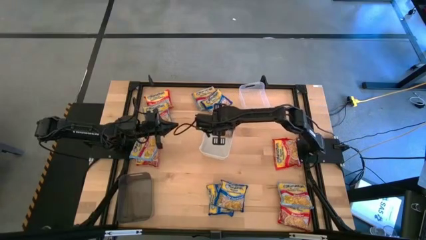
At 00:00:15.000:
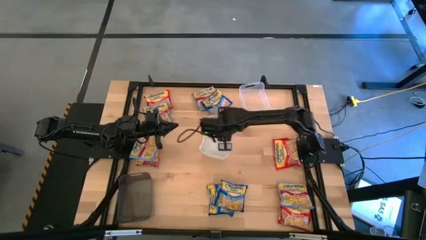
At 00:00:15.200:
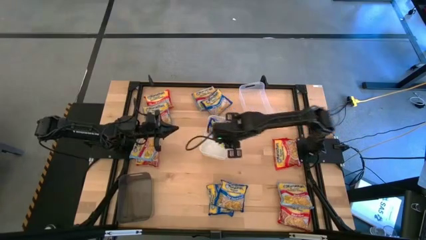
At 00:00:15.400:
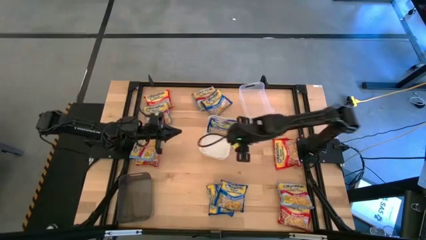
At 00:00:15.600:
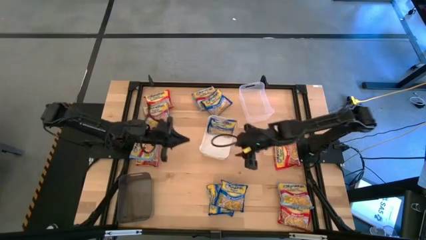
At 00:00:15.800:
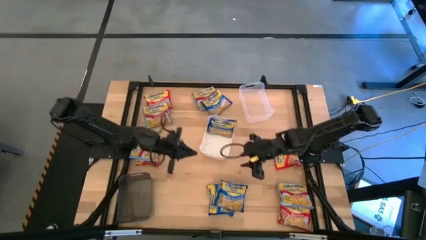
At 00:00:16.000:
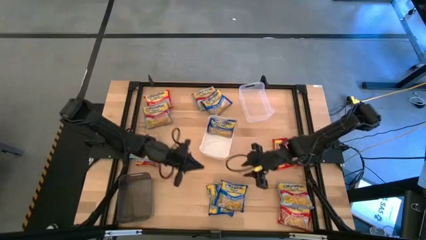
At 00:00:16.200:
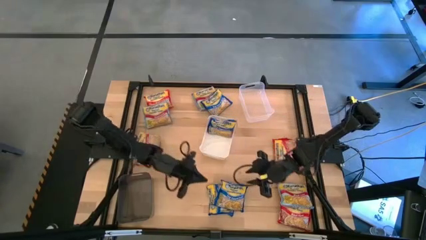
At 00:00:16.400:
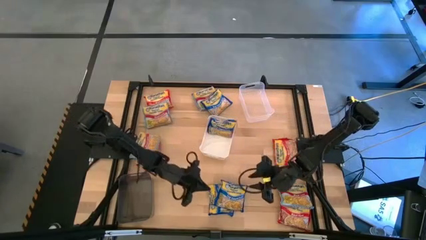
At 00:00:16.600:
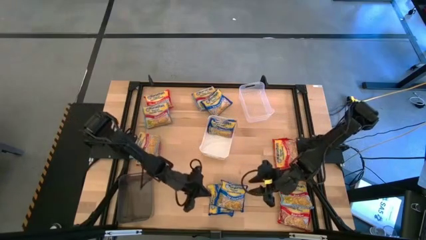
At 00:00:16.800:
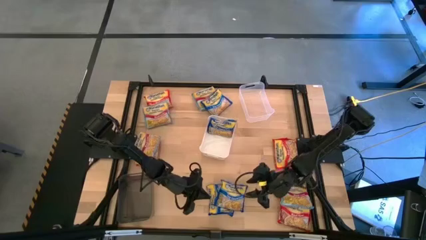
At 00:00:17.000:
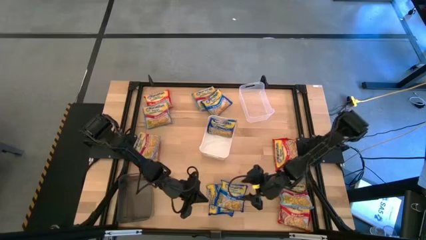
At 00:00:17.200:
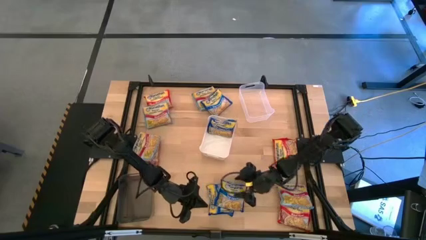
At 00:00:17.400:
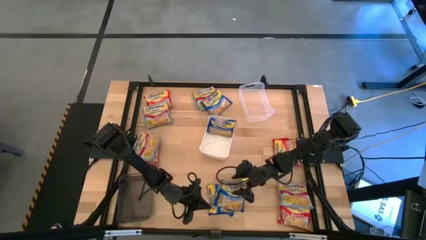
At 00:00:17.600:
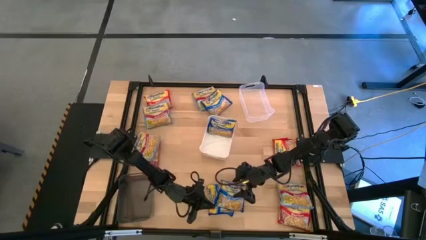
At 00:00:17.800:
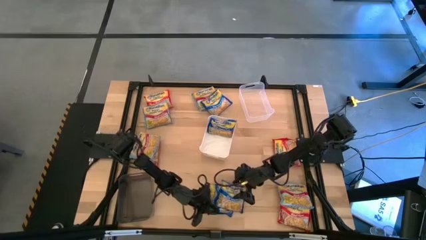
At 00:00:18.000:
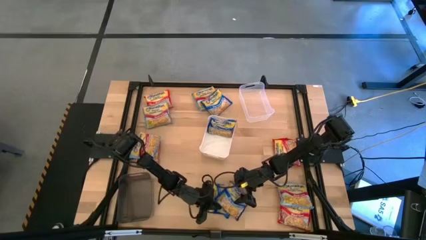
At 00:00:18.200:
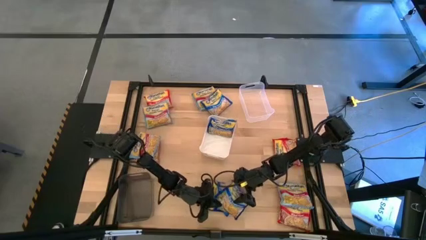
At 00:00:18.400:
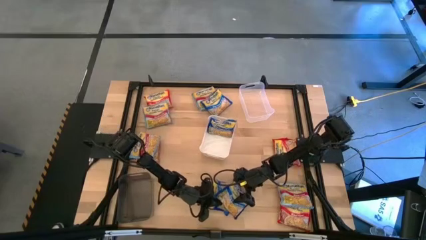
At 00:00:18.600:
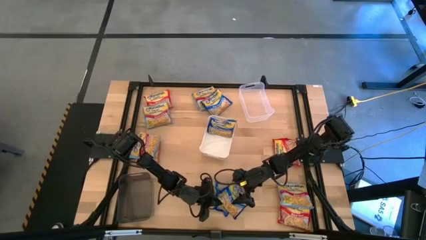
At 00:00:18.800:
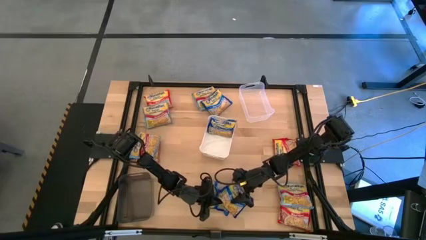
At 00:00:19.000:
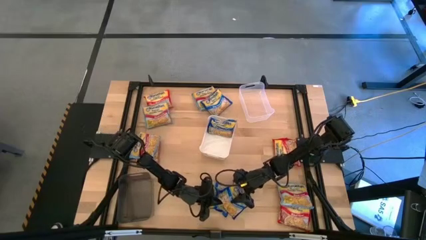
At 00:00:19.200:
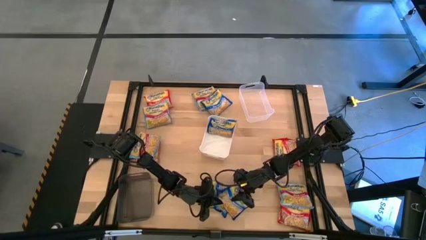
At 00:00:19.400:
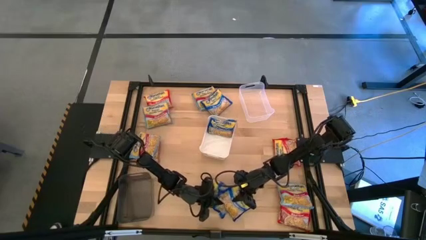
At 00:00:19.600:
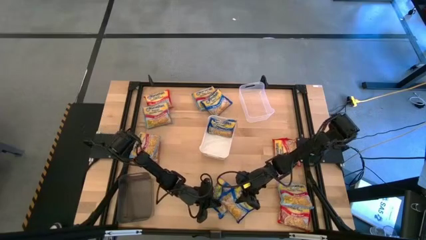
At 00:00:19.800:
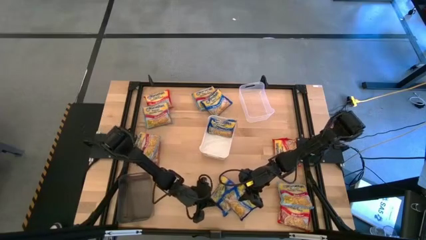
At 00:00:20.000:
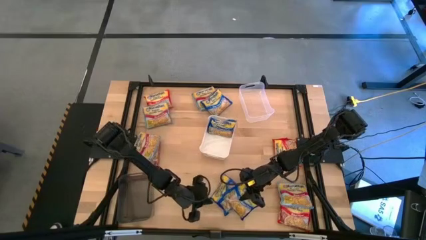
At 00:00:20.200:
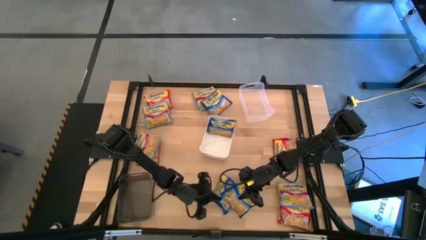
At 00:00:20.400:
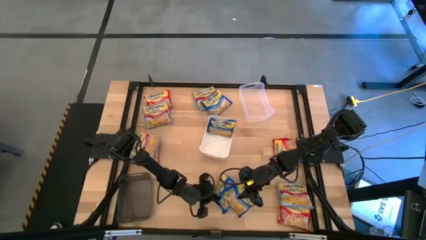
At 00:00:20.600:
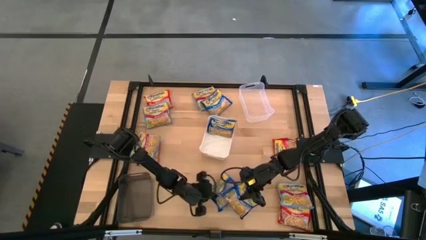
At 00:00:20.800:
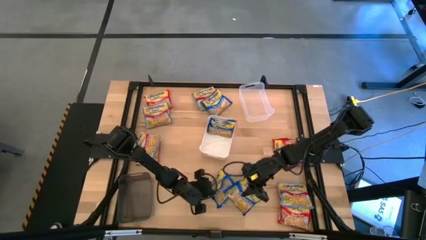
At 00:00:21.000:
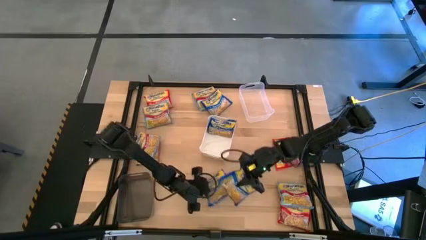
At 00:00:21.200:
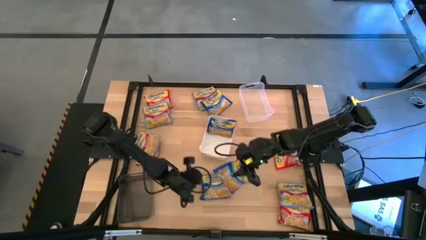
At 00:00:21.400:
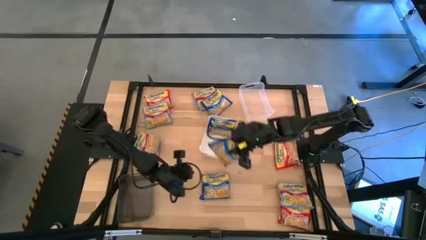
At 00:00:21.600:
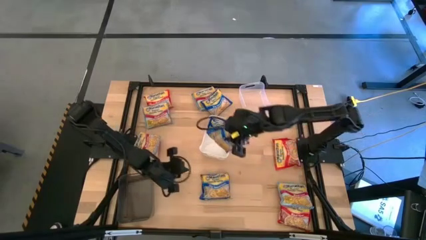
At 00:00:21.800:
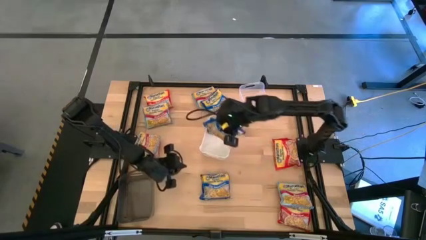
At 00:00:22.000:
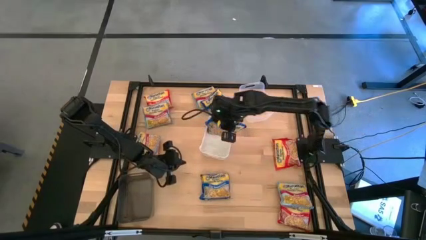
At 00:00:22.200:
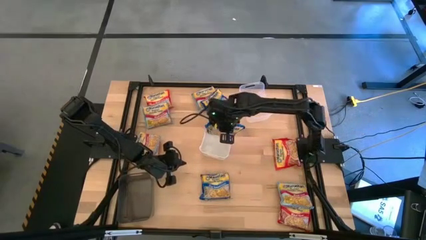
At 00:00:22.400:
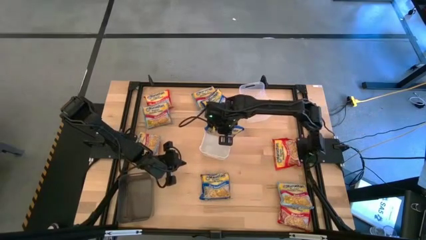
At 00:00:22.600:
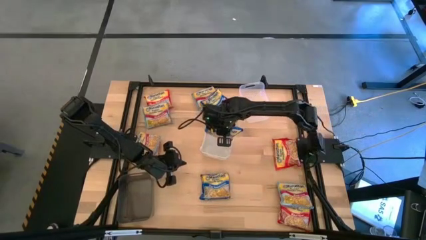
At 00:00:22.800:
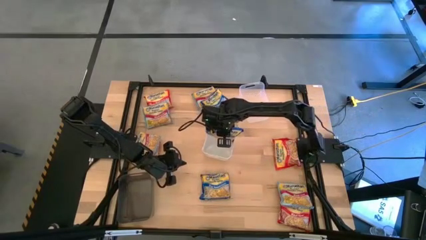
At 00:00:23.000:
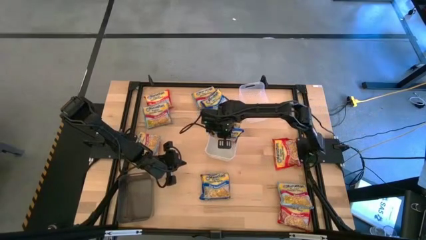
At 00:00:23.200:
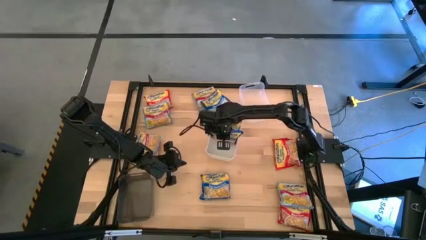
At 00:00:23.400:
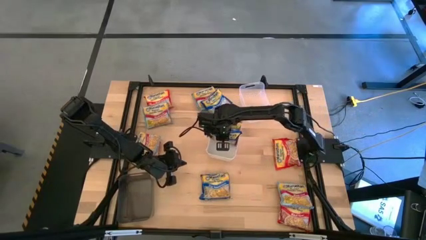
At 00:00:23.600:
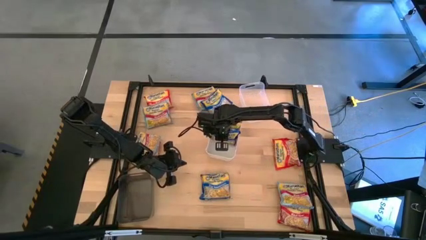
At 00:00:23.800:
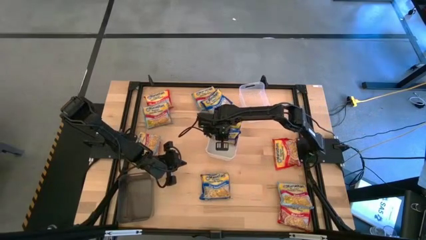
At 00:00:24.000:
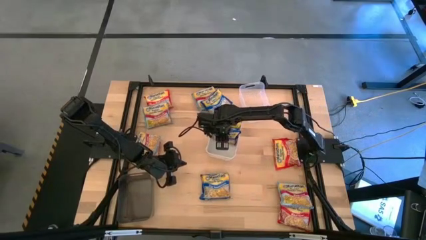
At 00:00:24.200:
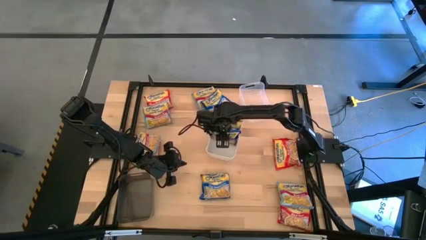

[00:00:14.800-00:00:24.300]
Task: Sort Maruchan noodles
Put the blue noodle pack in the white bin

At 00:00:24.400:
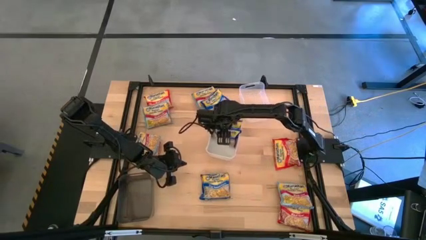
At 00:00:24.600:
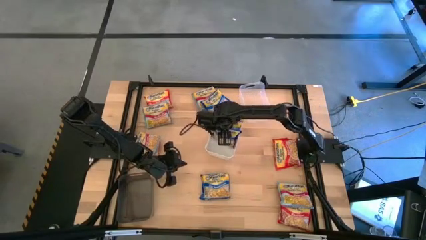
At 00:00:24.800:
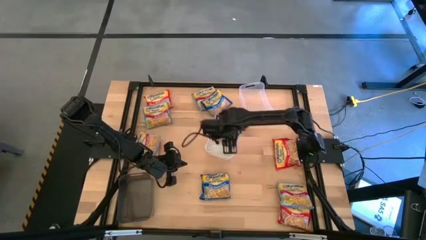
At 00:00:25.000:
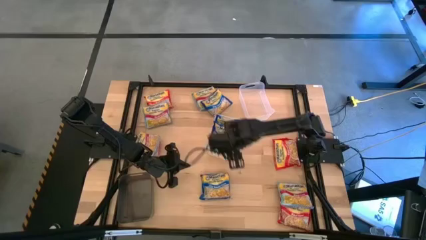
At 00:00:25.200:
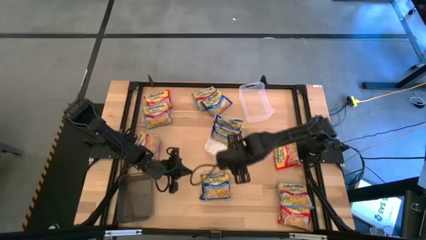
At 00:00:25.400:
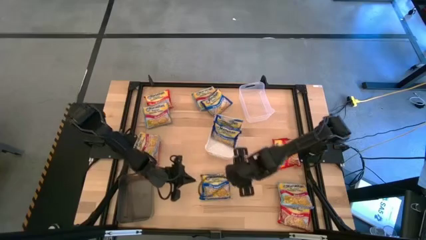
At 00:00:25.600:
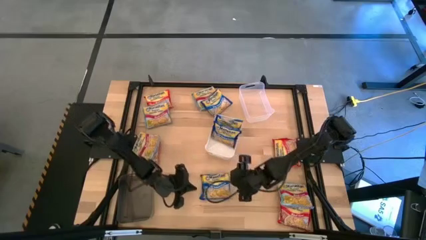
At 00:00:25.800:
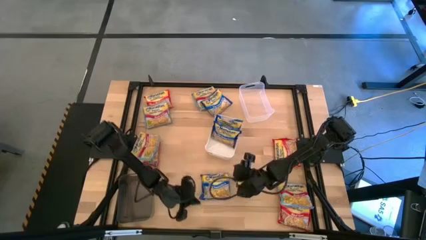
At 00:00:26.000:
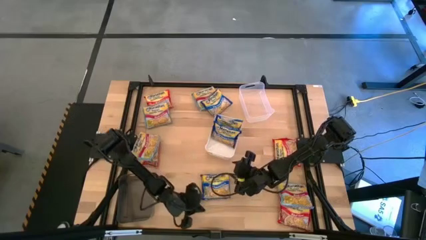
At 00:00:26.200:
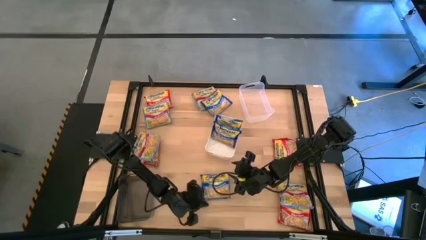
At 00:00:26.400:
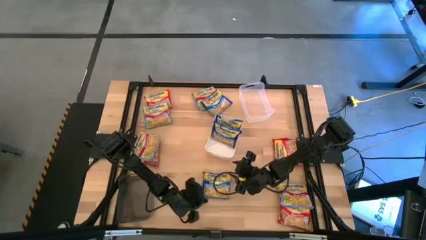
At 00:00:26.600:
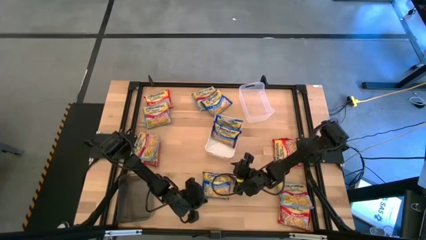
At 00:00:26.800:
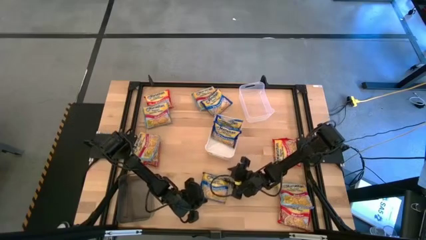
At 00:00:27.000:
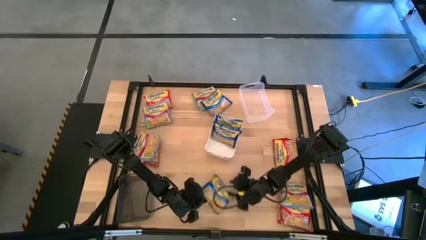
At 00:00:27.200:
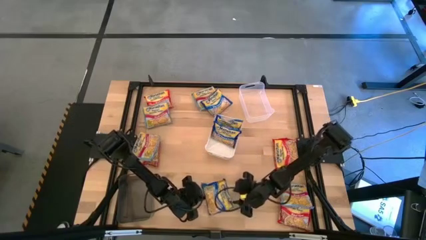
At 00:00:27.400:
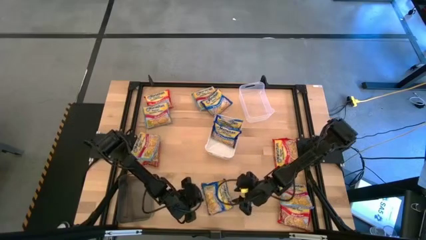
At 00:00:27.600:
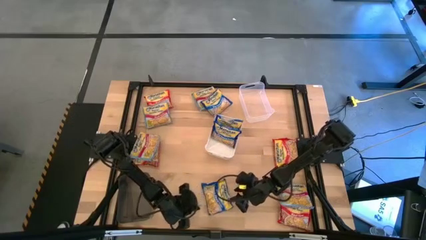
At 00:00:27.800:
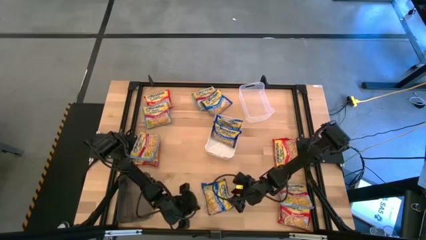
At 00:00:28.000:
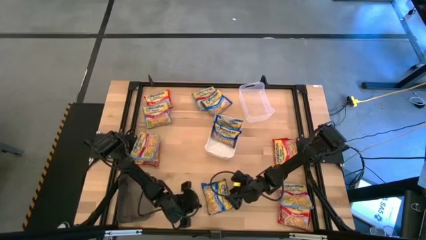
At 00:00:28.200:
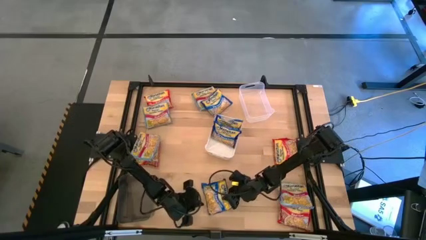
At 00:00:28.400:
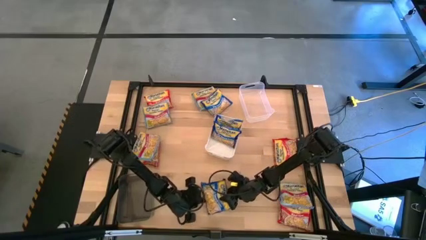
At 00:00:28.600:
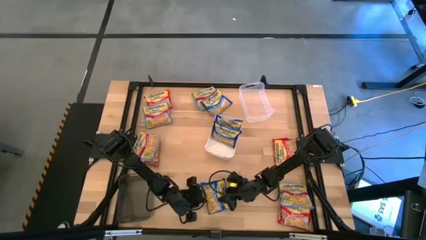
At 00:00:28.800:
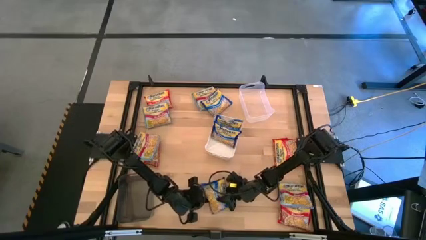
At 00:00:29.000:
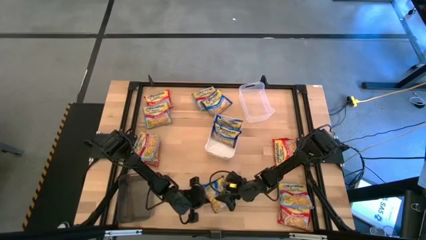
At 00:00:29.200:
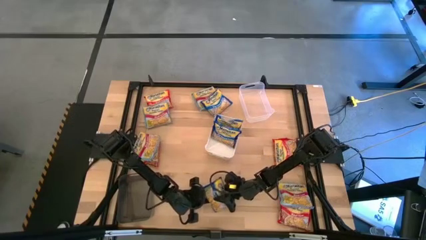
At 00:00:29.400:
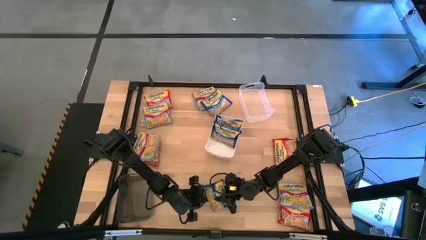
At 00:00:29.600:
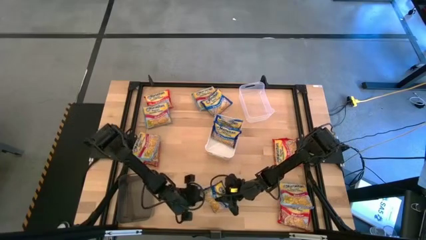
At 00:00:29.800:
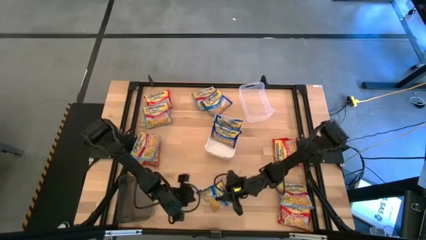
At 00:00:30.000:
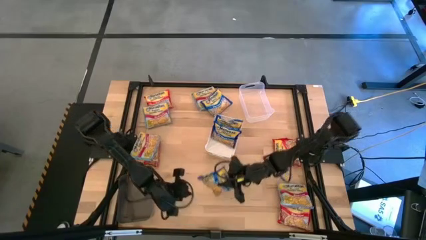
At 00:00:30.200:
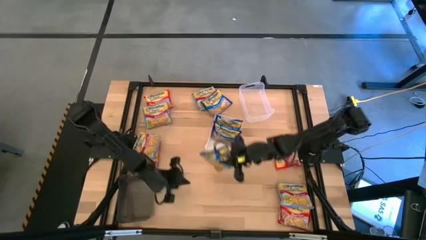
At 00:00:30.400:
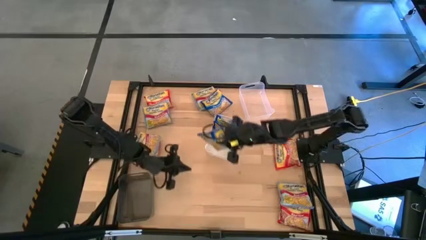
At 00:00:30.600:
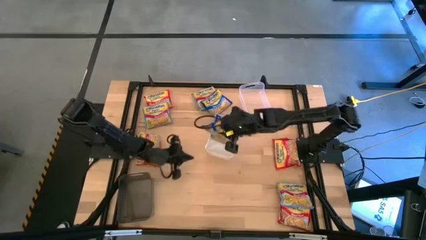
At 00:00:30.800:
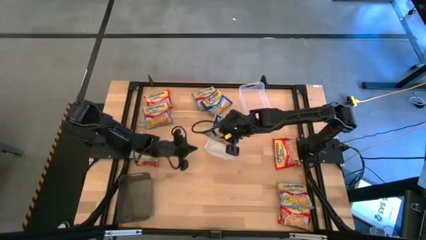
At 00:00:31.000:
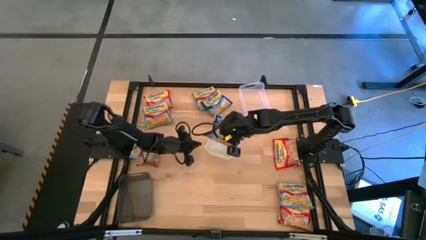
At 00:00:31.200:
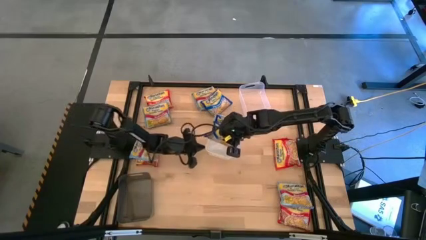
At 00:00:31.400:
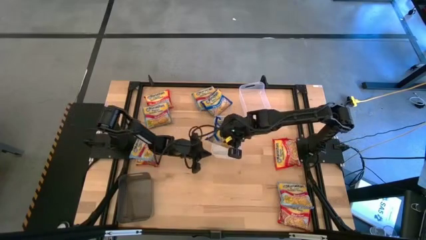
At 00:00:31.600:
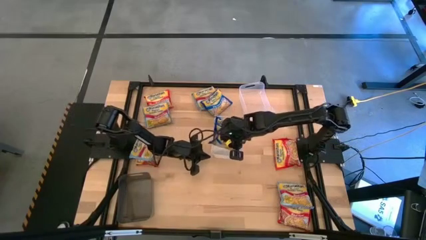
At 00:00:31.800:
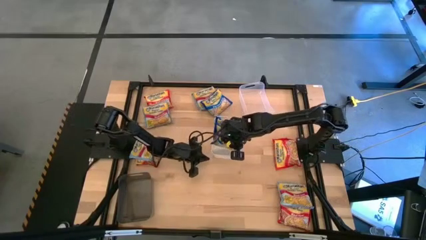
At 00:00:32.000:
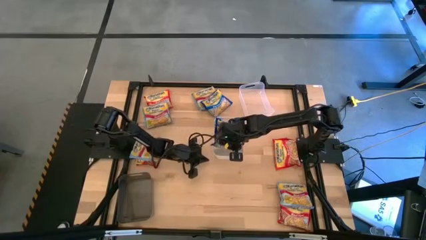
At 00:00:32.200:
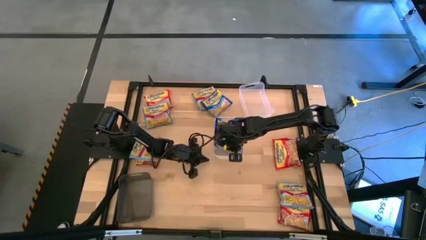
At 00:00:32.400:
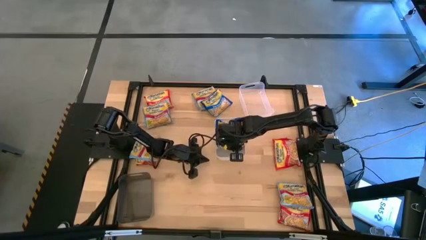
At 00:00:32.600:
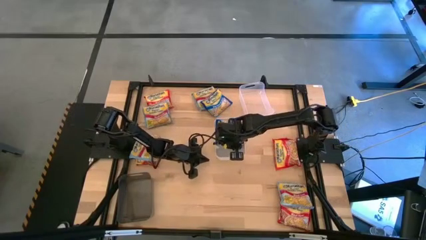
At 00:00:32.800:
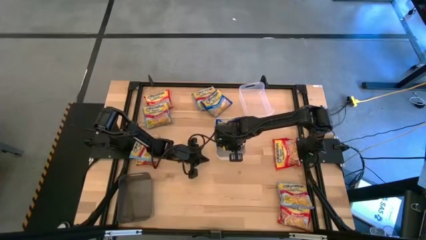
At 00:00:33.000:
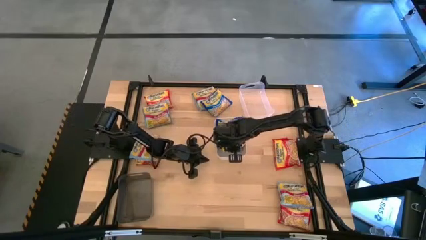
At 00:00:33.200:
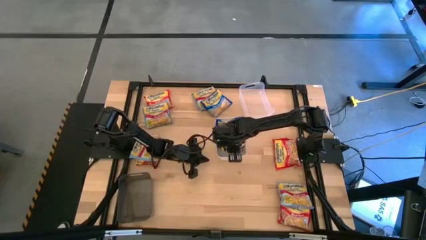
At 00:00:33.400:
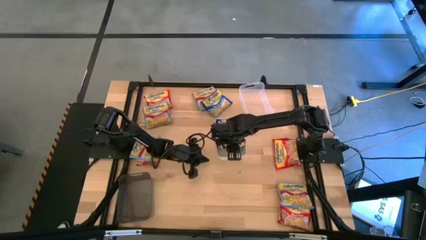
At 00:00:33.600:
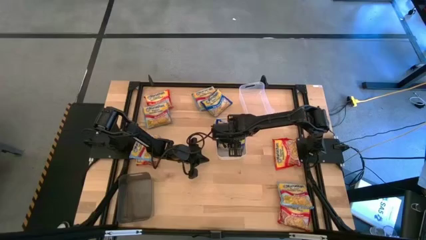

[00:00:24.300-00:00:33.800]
Put the blue noodle pack in the white bin
